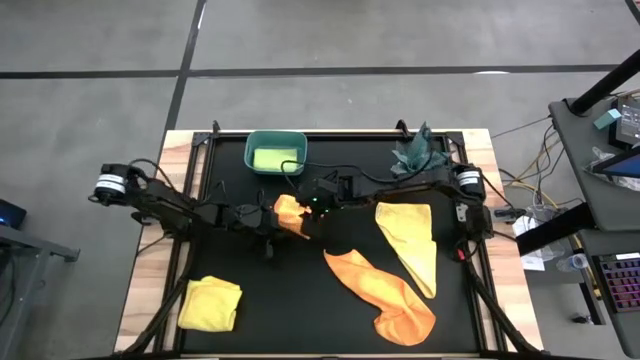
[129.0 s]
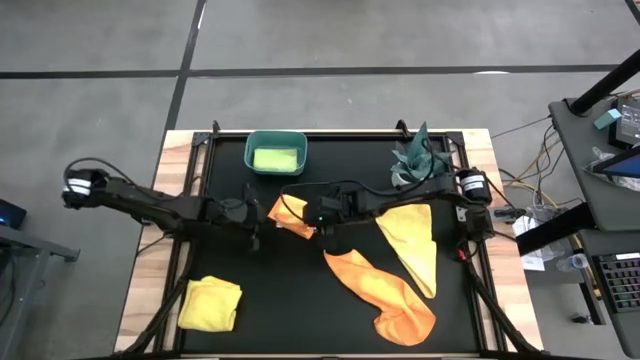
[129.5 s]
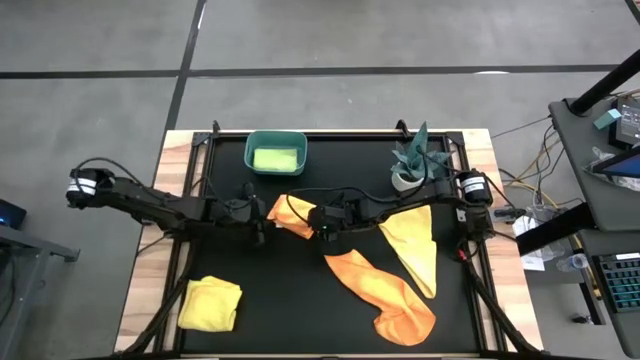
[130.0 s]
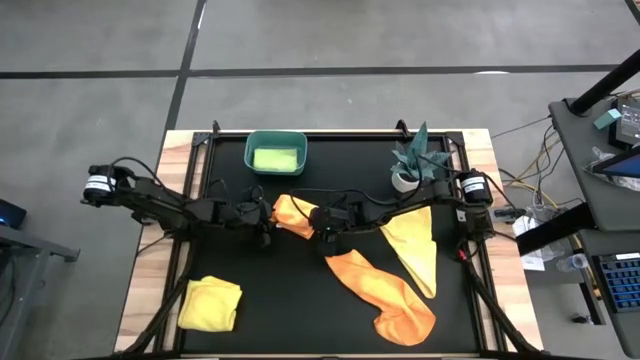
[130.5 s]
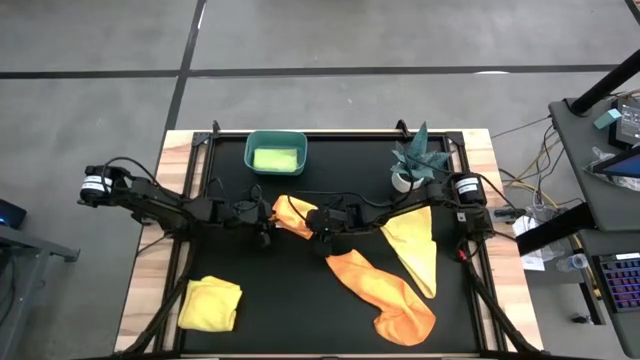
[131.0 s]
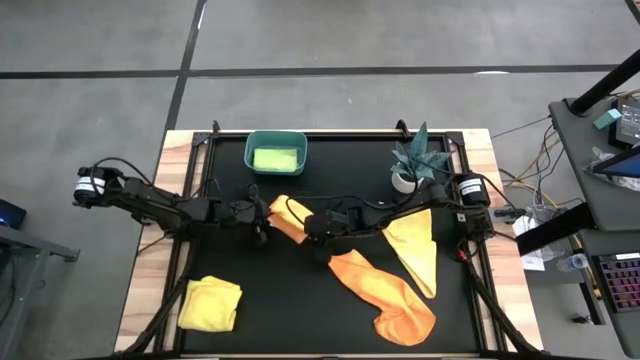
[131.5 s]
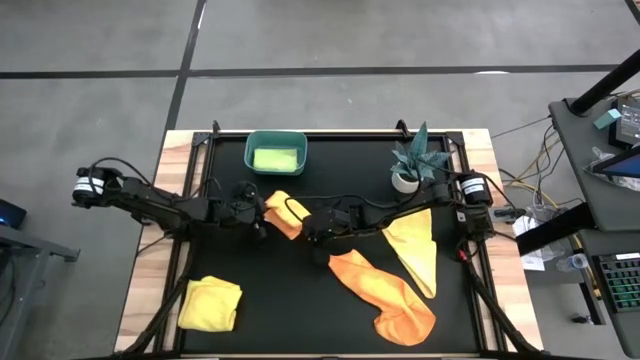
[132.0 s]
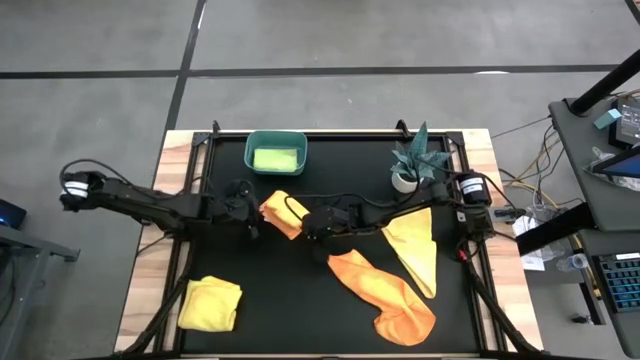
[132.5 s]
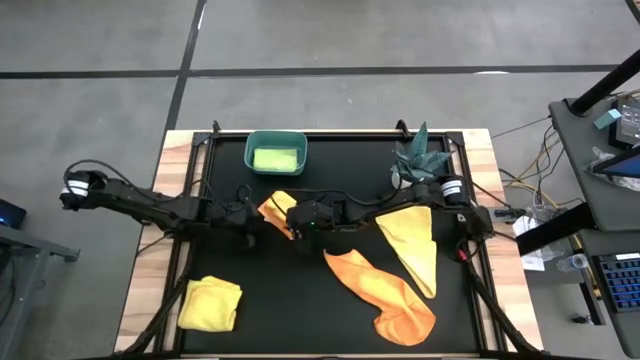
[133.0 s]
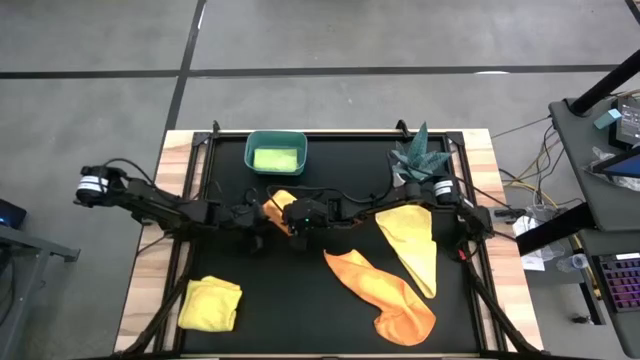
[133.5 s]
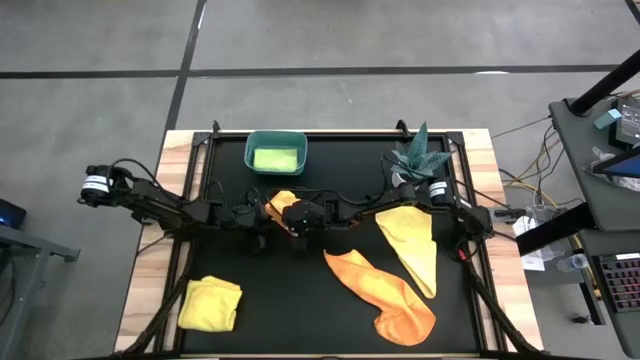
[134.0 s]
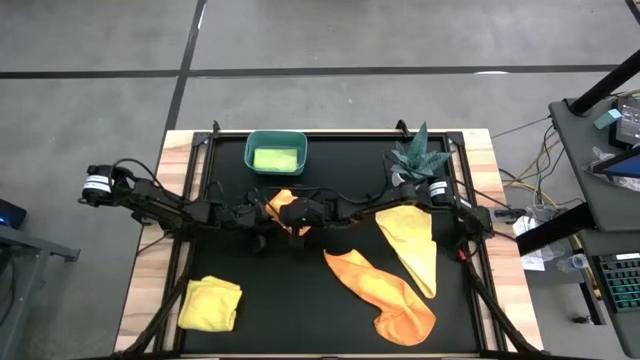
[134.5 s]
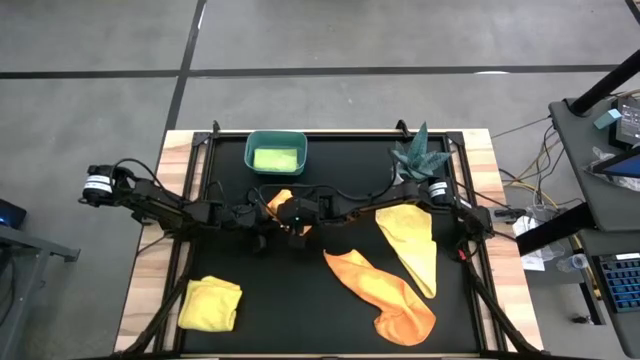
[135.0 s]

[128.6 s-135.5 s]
Task: Fold microfiber towels
Fold the top orange microfiber cloth

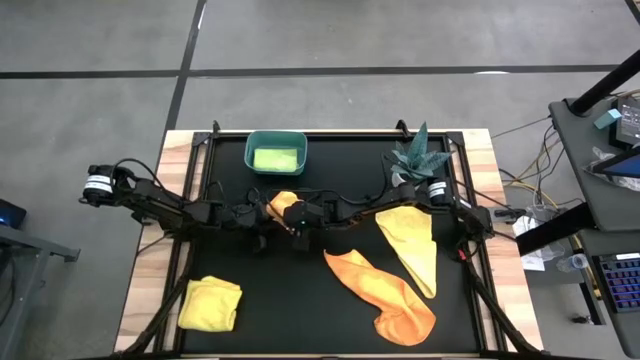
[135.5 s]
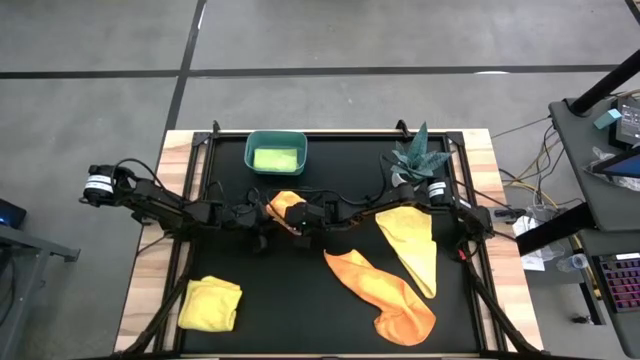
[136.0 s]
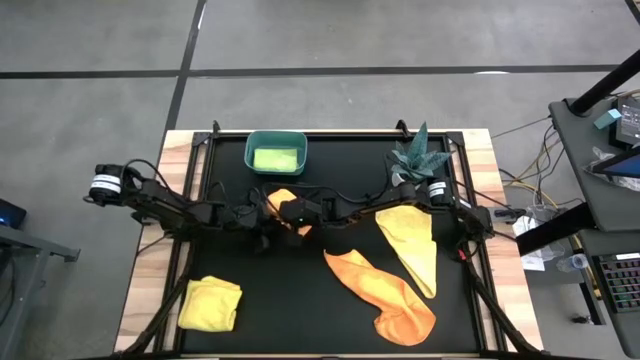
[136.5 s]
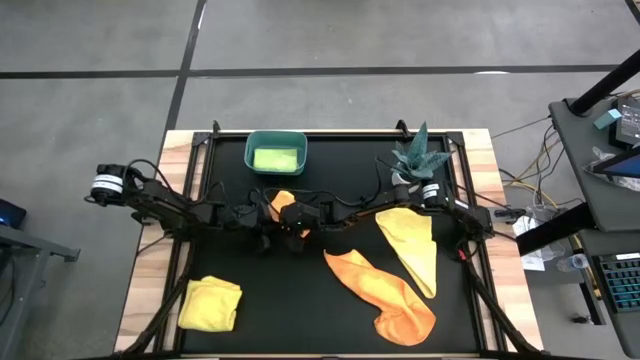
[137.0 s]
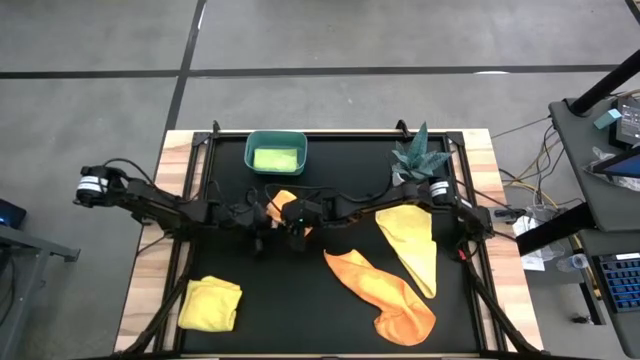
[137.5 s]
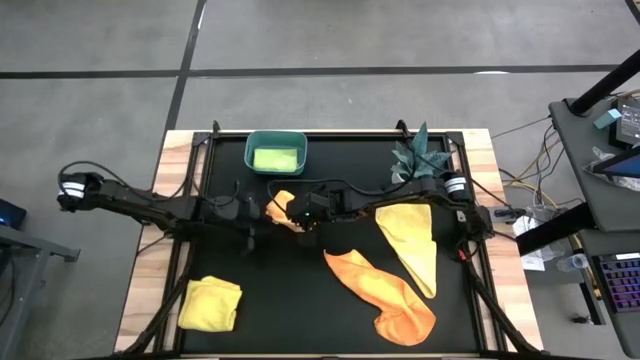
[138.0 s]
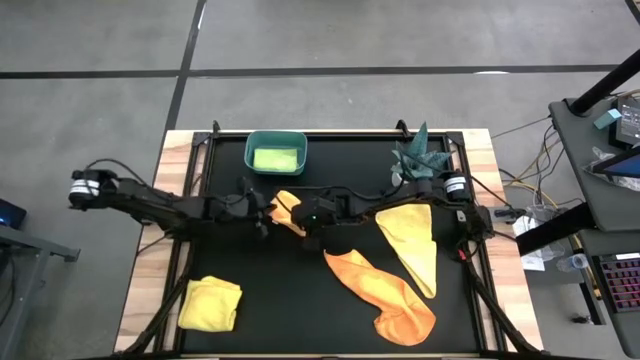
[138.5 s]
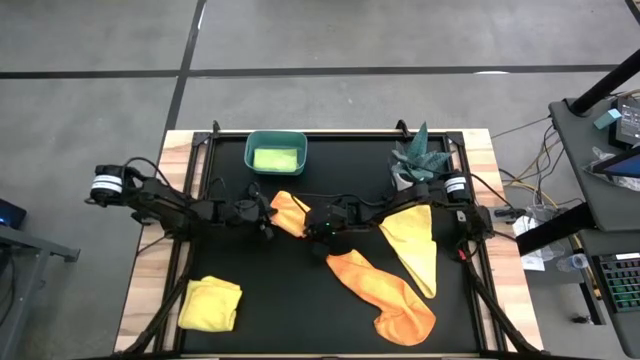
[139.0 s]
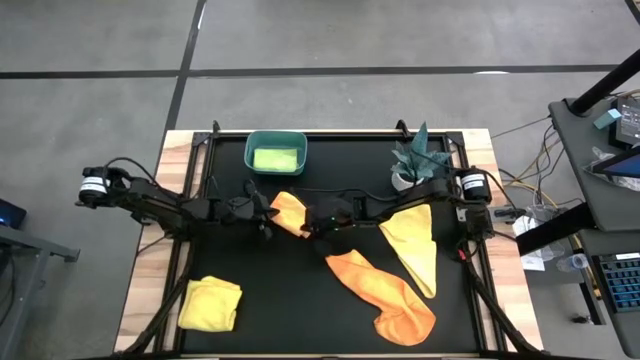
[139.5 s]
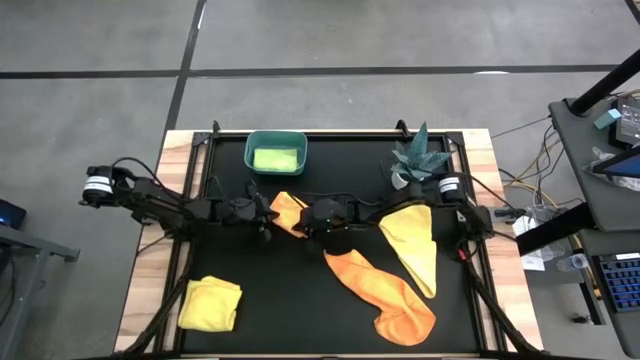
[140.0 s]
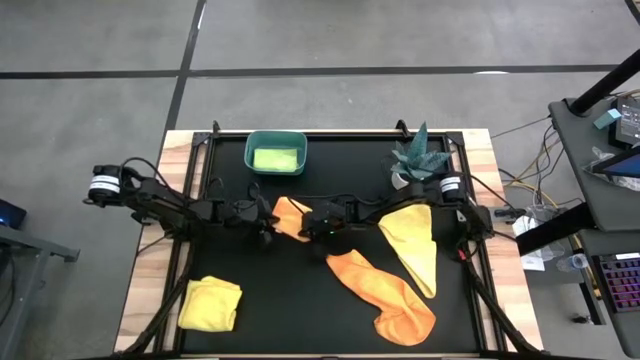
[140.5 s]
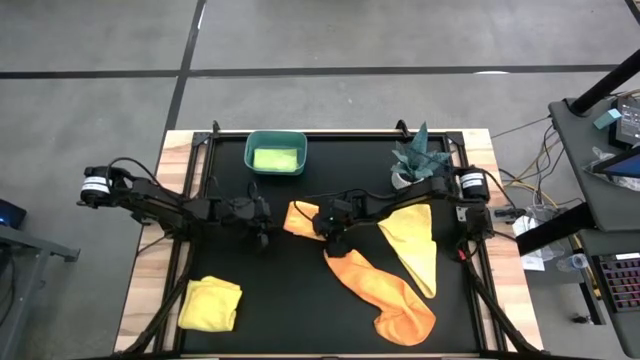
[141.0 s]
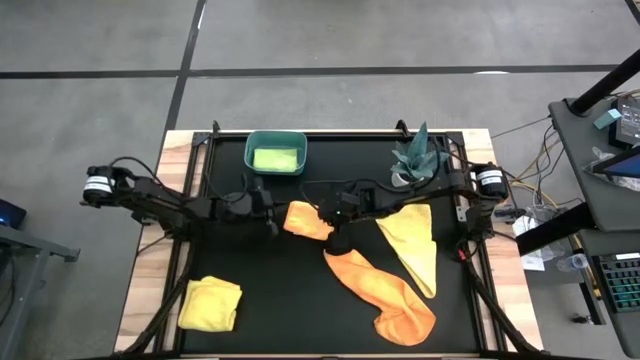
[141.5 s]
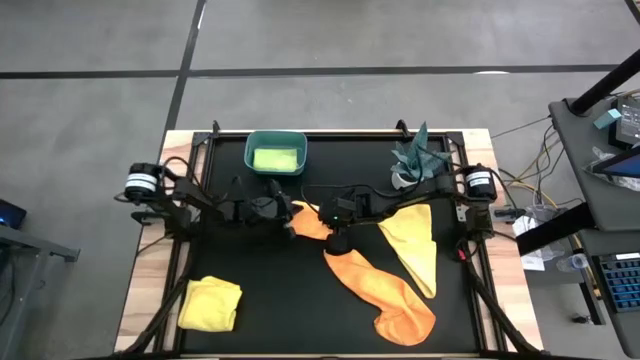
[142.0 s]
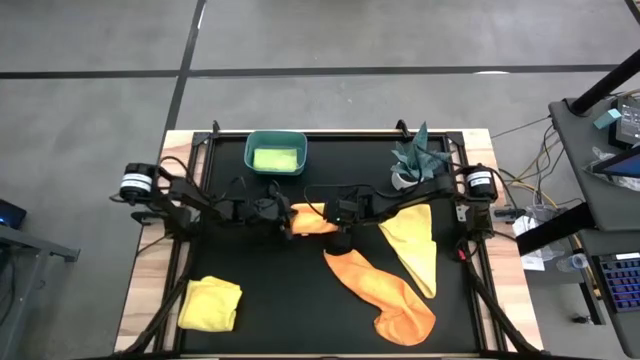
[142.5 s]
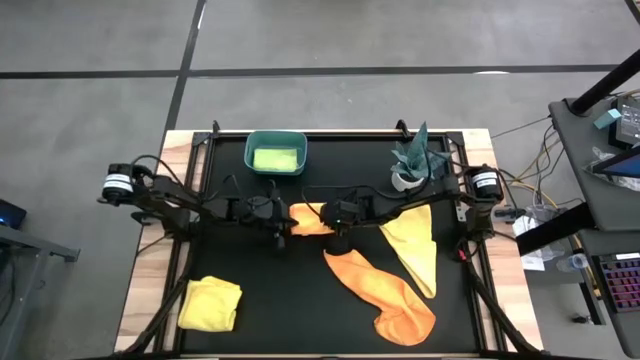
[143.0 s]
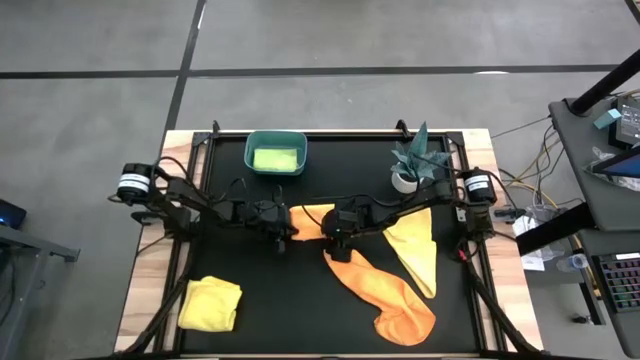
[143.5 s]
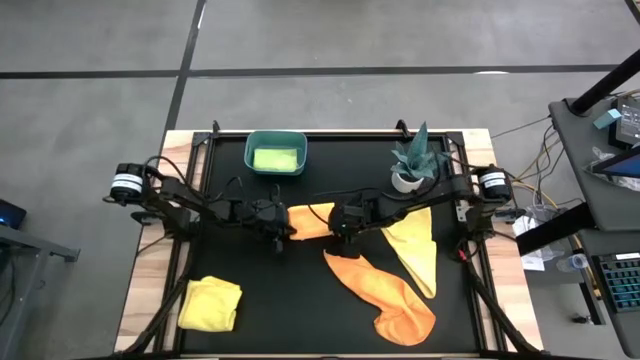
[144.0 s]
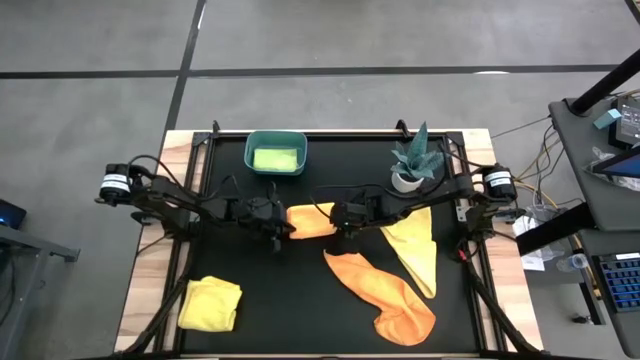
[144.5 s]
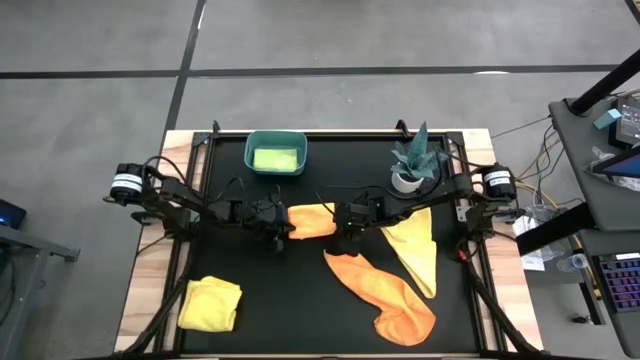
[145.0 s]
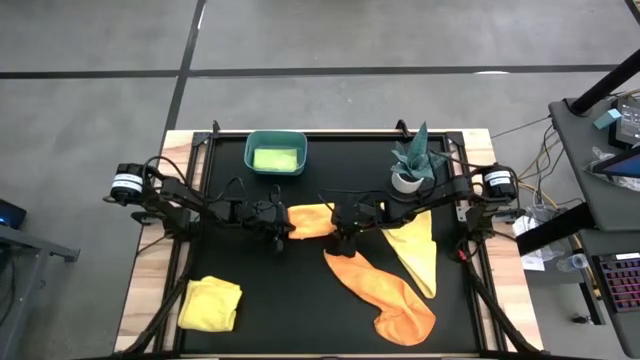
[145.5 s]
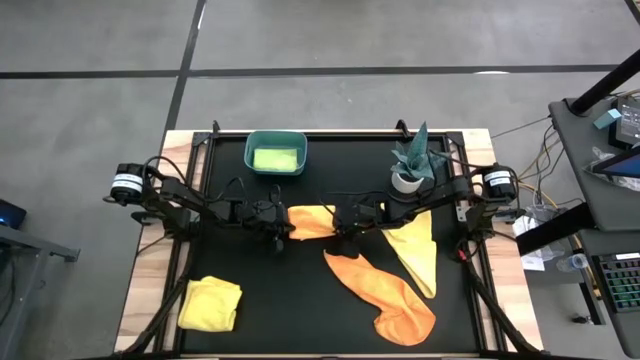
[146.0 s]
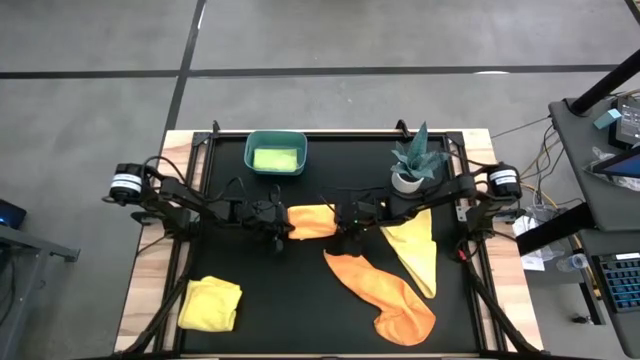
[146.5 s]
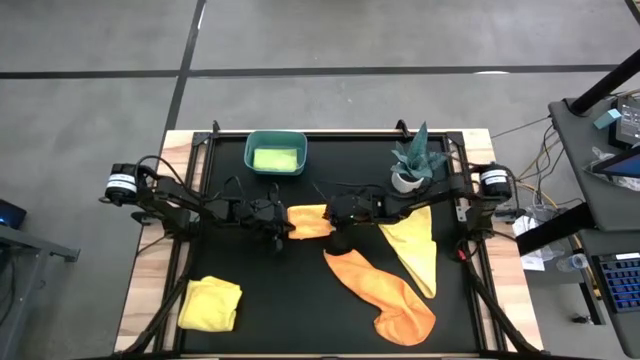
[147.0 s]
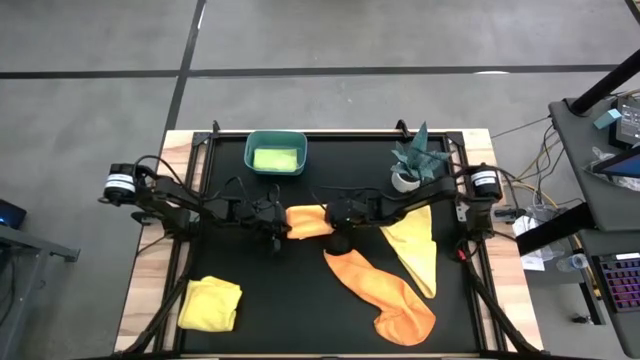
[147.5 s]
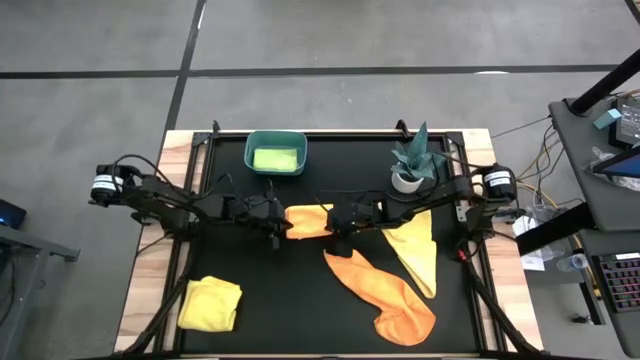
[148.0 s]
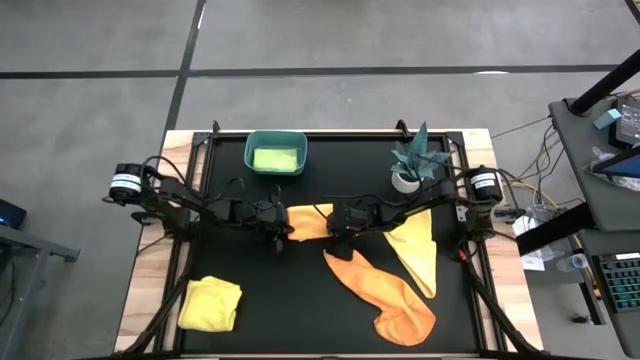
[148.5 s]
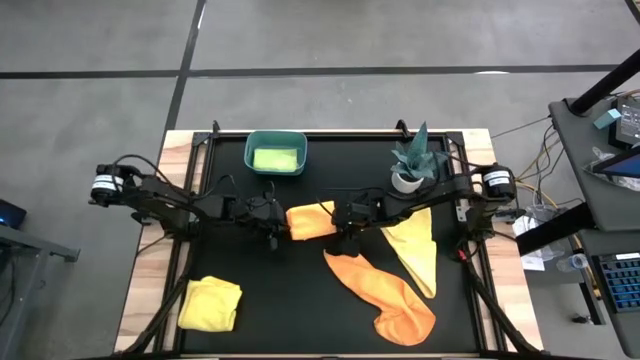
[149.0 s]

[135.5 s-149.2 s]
Fold the top orange microfiber cloth
